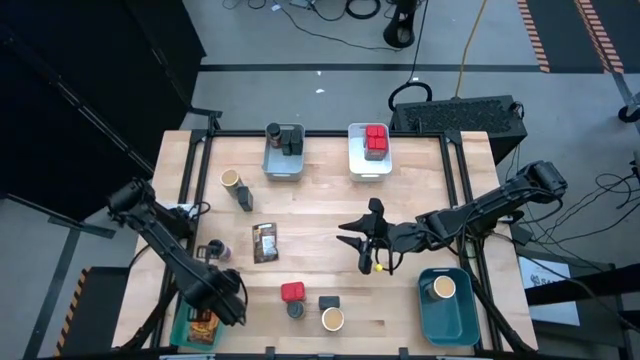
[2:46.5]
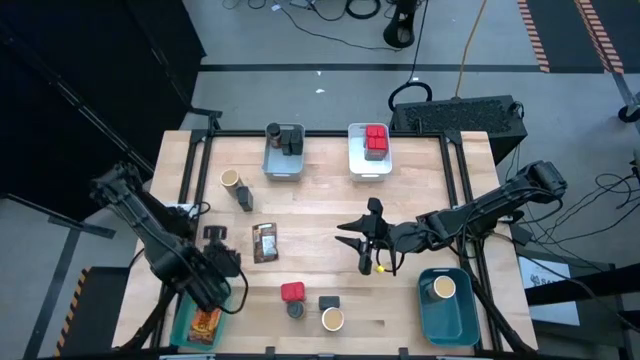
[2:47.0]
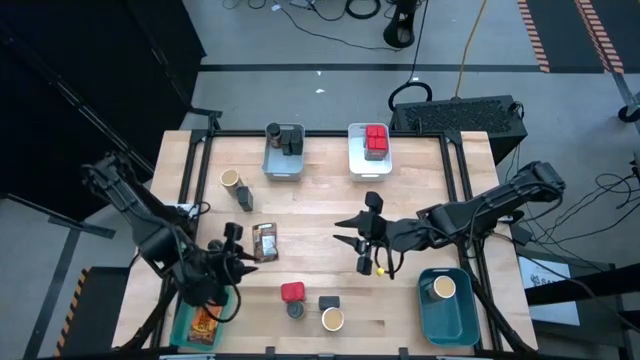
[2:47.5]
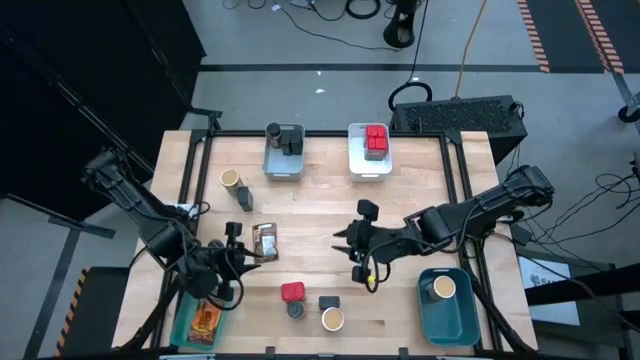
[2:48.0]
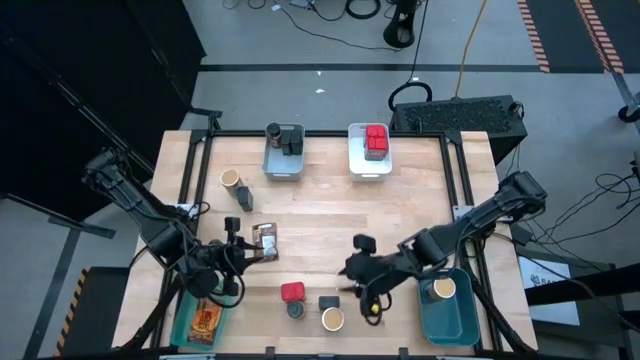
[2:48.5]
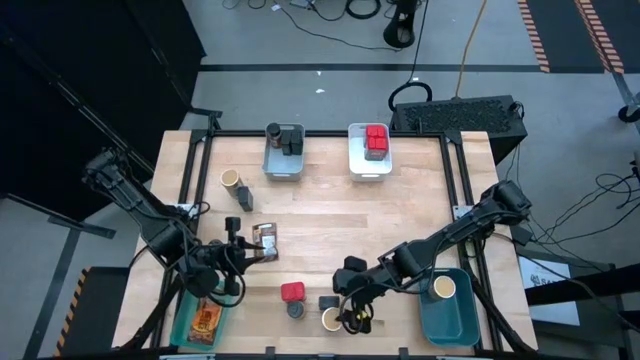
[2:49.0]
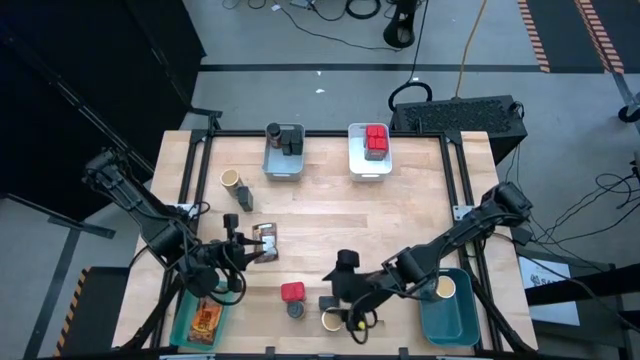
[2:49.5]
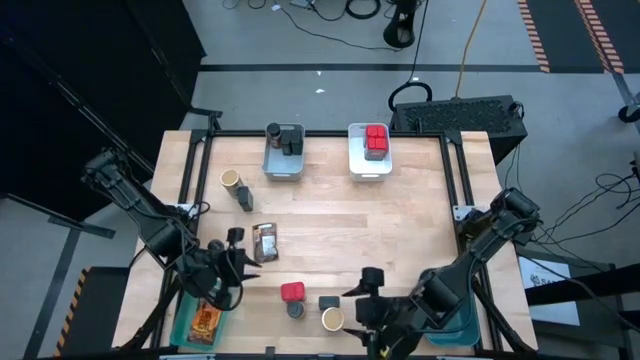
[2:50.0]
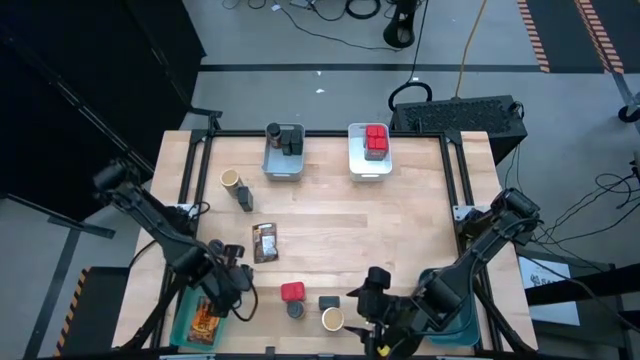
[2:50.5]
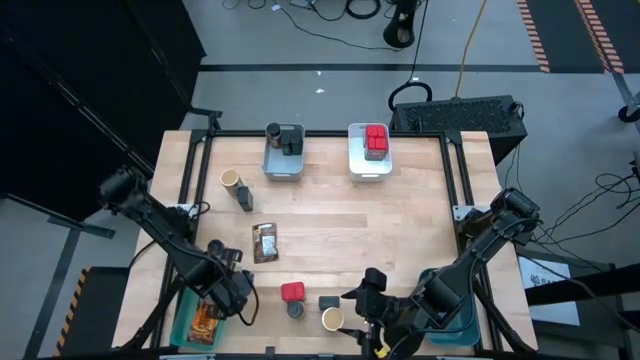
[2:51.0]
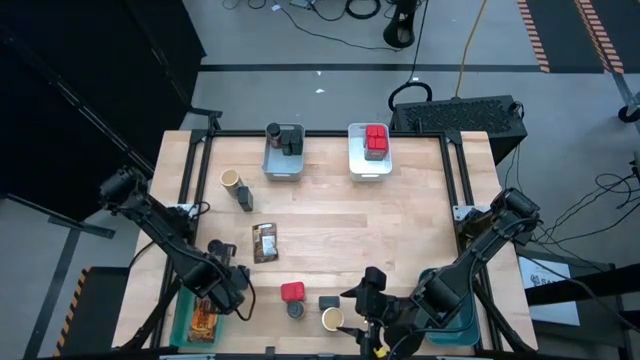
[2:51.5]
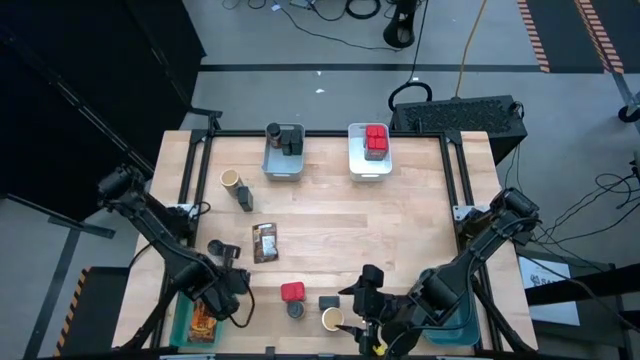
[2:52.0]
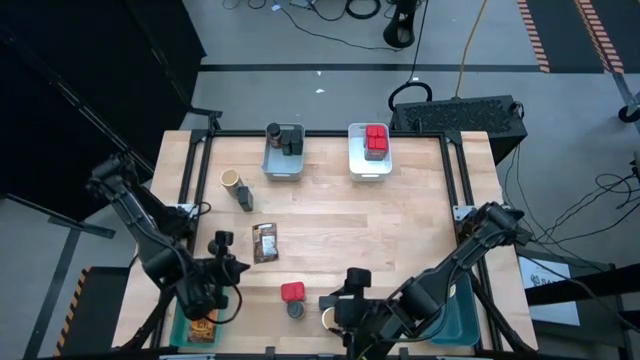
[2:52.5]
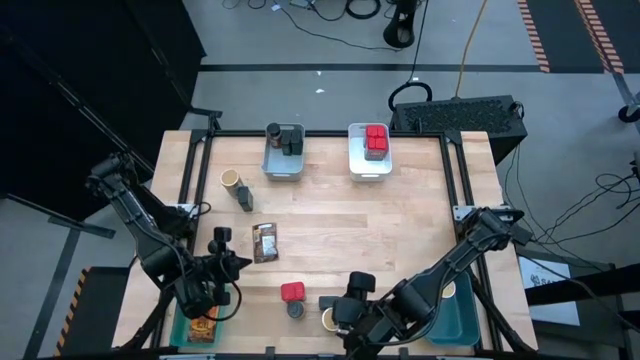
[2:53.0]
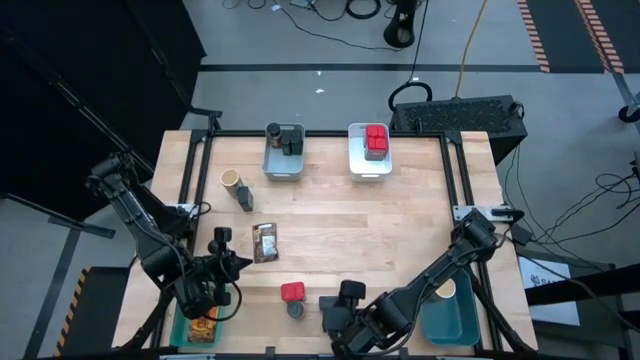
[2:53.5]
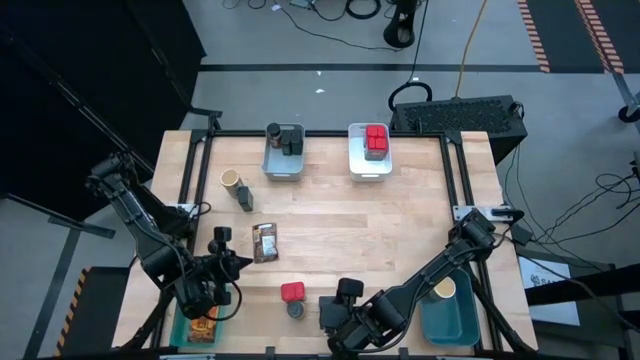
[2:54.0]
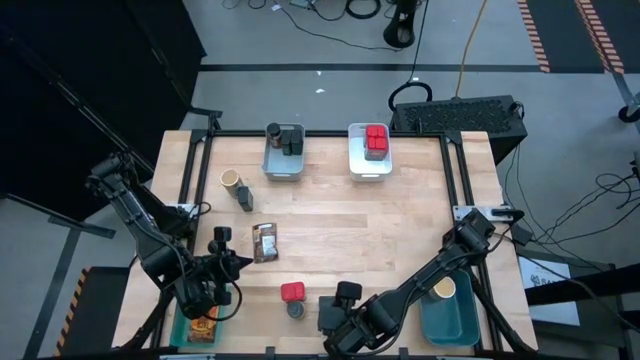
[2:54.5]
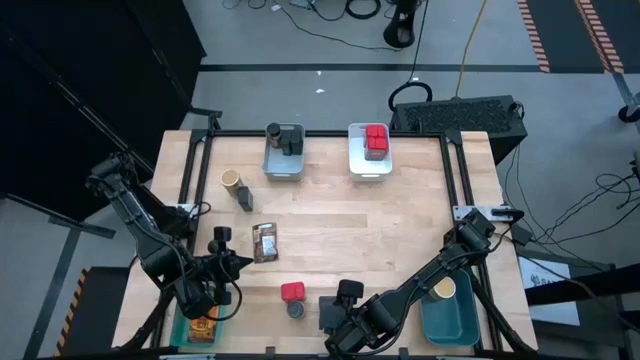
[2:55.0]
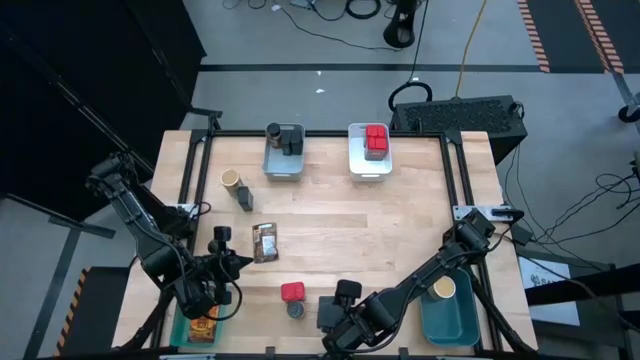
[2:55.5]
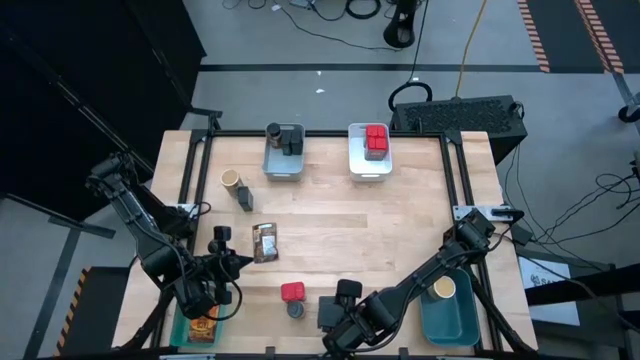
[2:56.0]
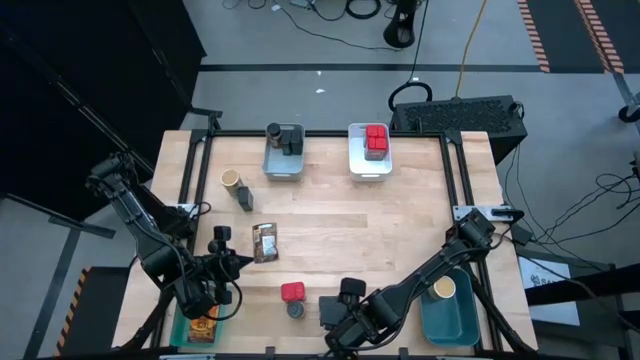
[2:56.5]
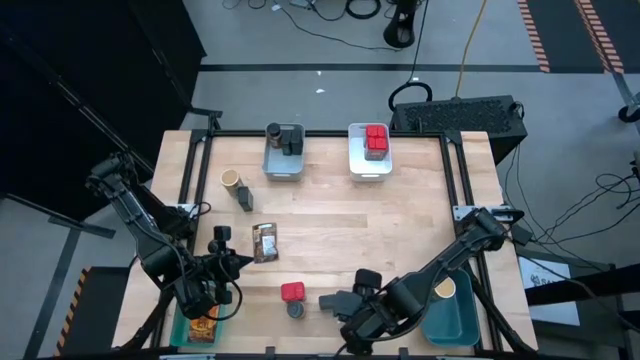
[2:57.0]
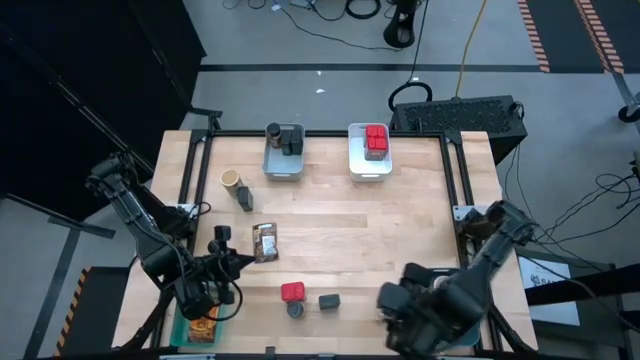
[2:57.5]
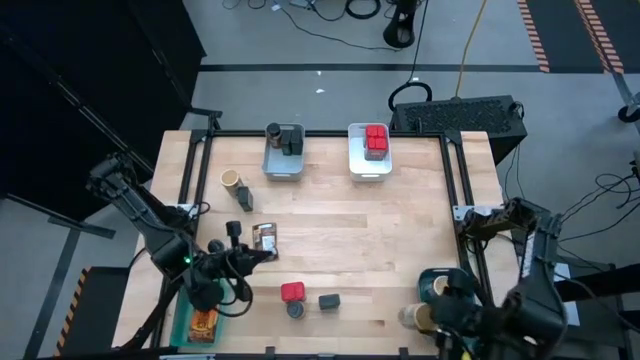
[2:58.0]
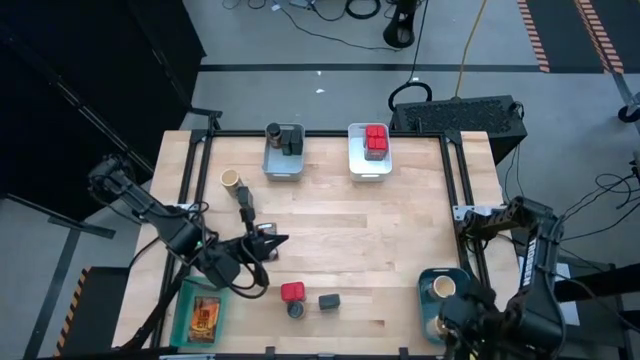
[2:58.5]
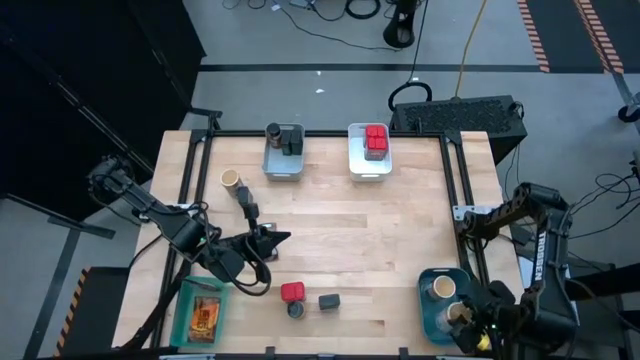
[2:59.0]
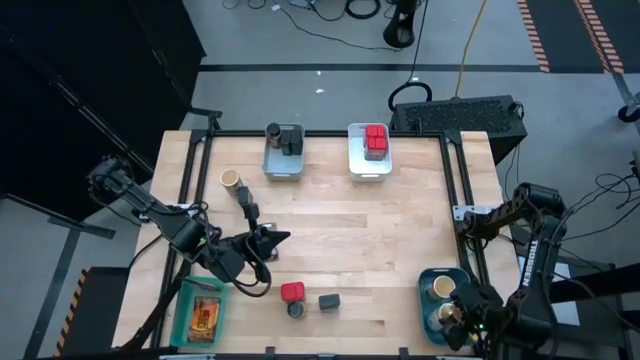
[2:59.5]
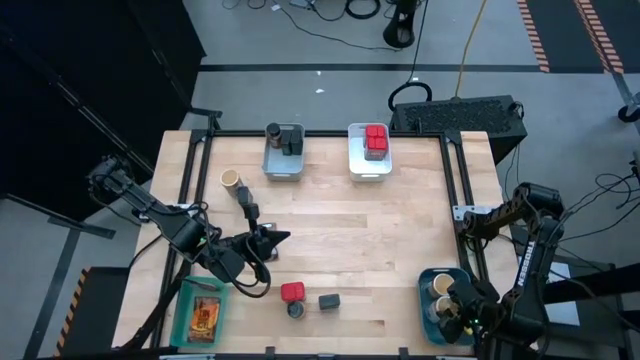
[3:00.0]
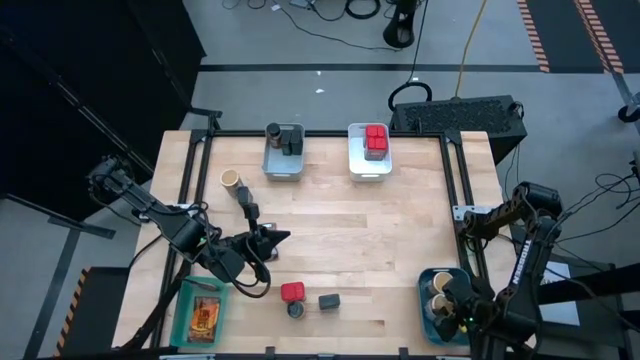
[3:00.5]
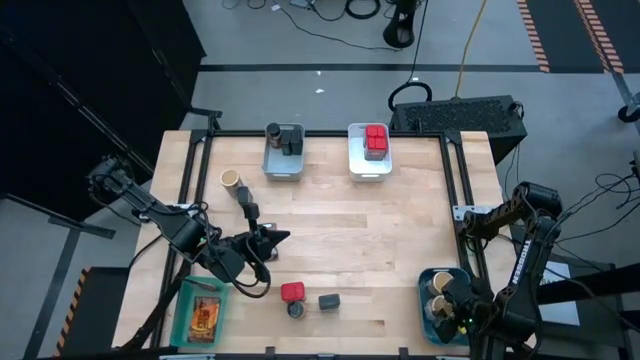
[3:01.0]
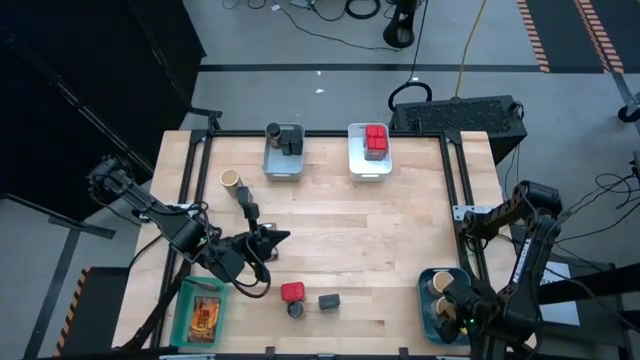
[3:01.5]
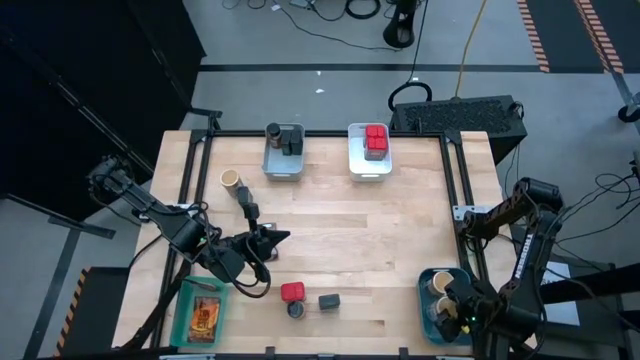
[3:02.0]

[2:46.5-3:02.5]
Task: Sort spices by type
Put the gold spice bottle into the blue bin

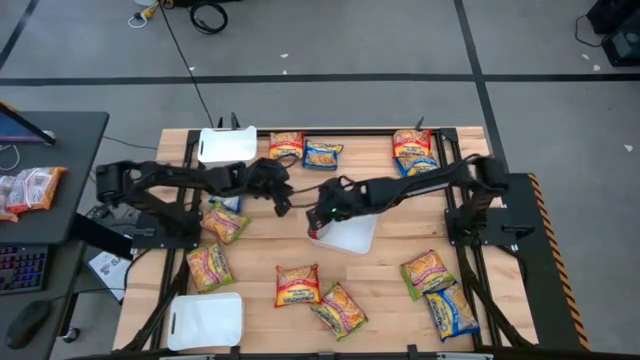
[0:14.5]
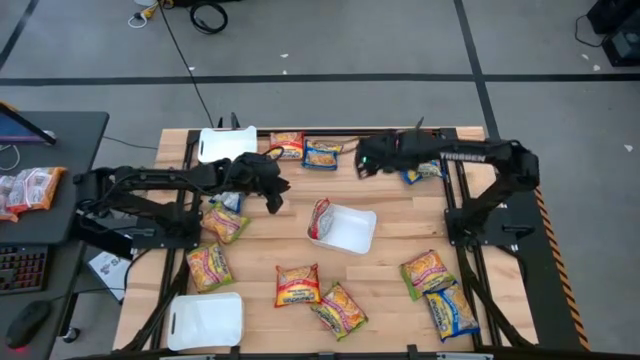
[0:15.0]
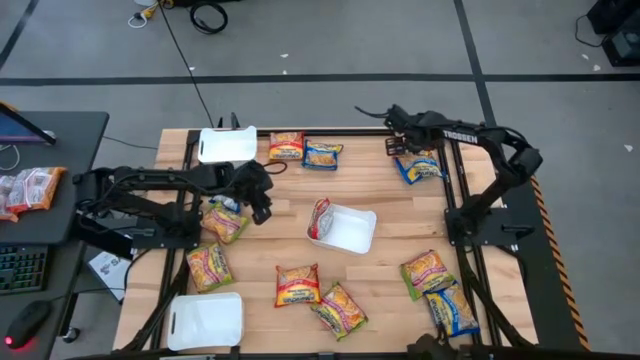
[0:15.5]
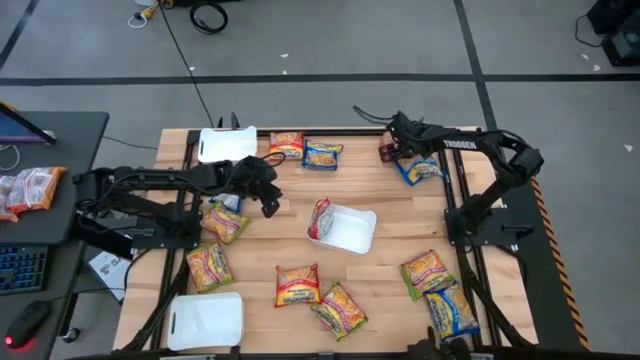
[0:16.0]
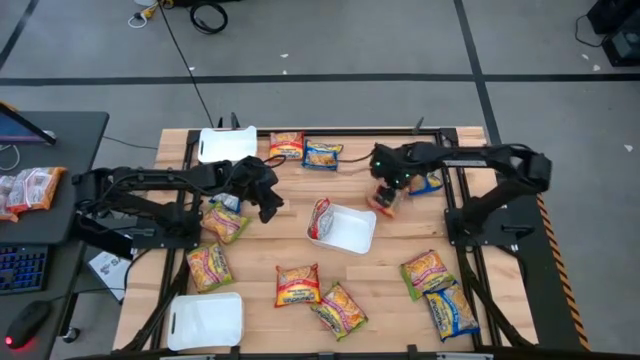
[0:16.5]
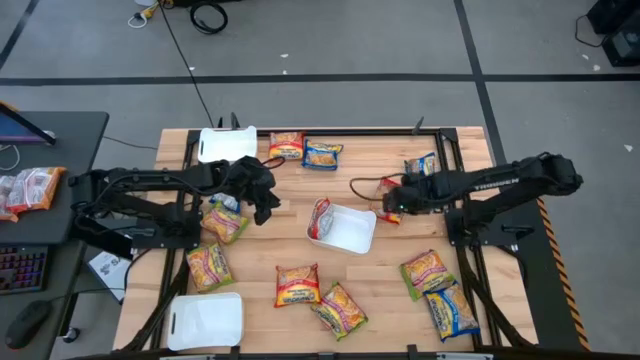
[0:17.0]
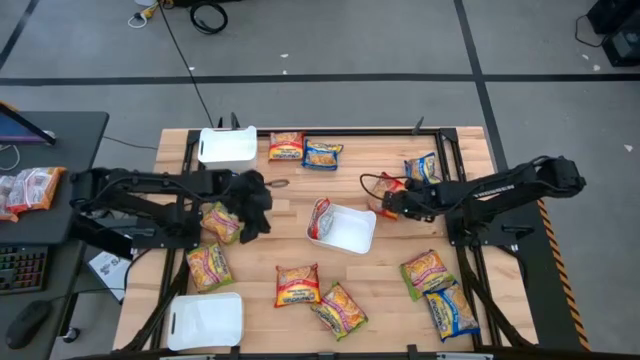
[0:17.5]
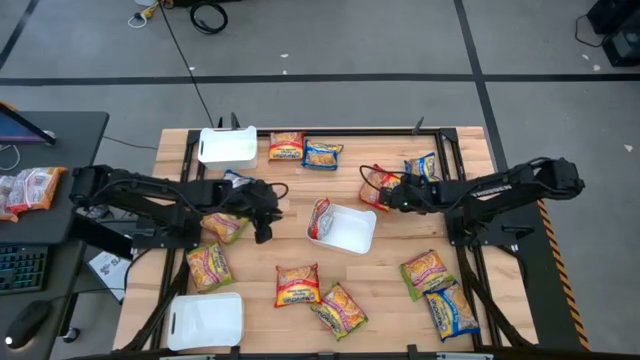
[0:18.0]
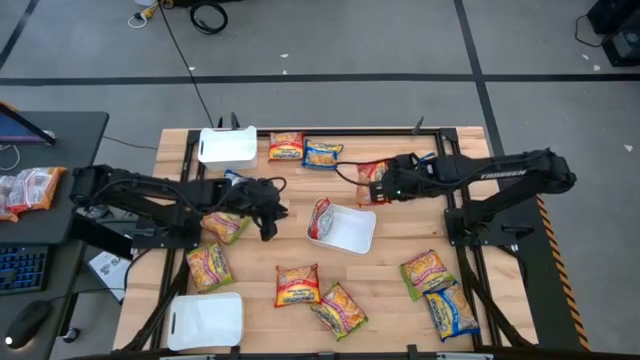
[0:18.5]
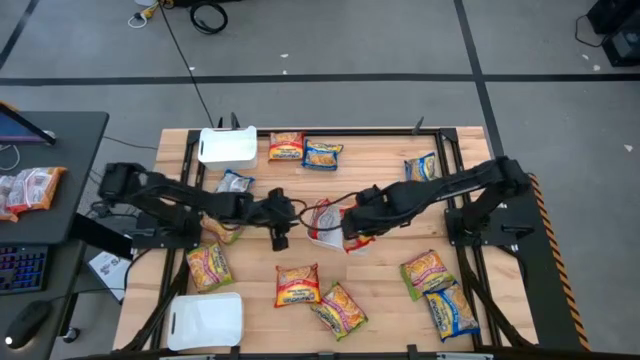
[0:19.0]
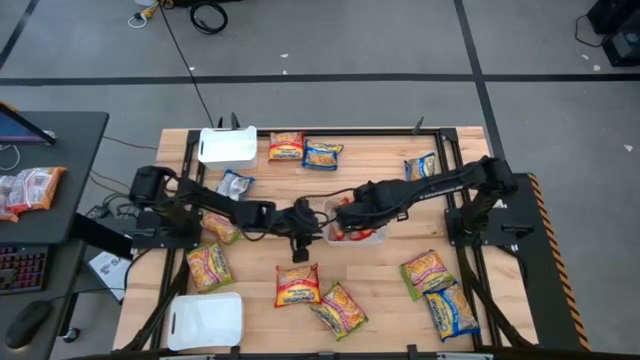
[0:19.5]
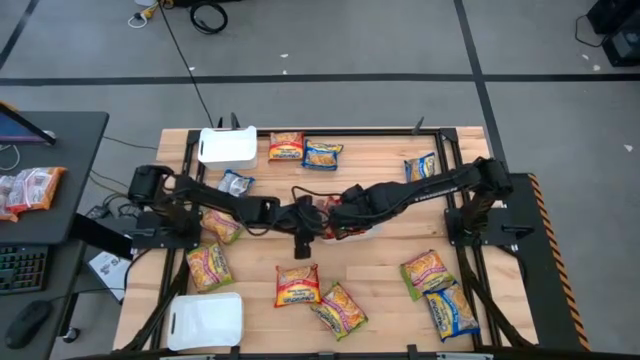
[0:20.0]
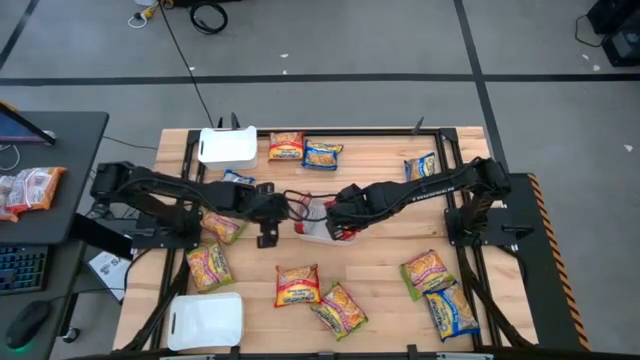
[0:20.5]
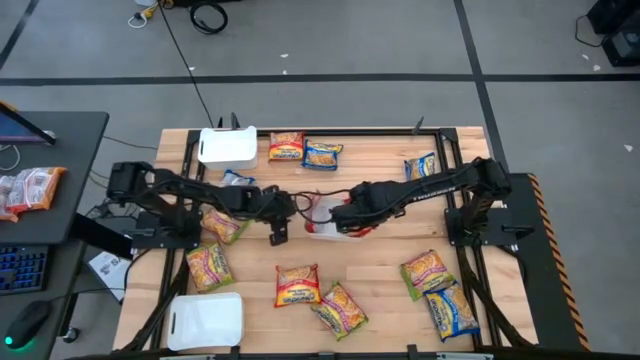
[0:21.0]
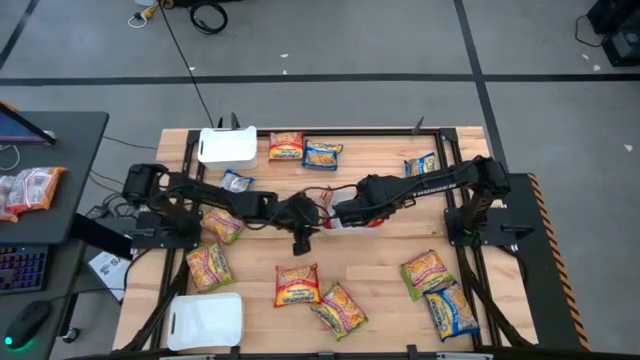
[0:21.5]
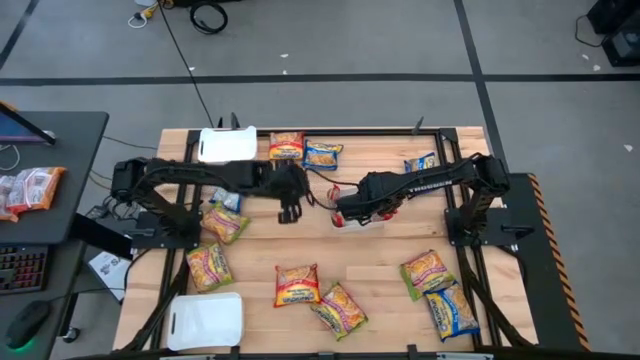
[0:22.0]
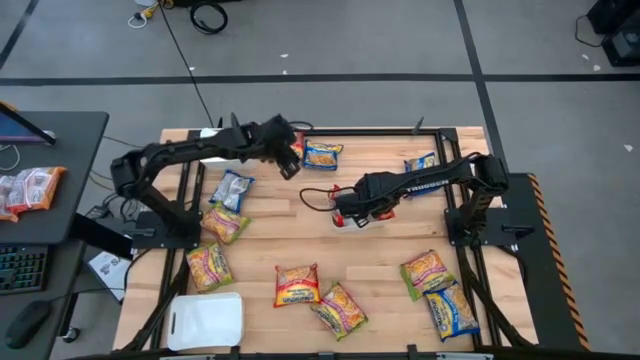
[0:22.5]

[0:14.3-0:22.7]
Task: Sort Maruchan noodles
Put the orange noodle pack into the middle white bin
